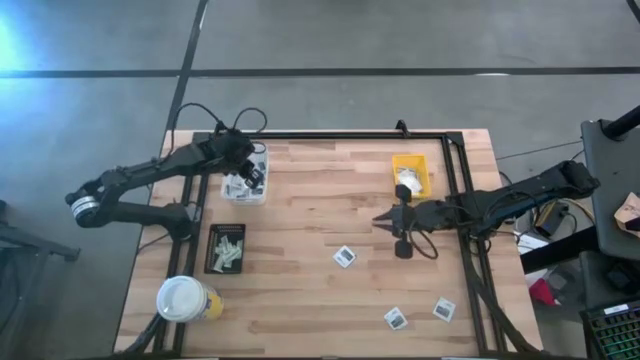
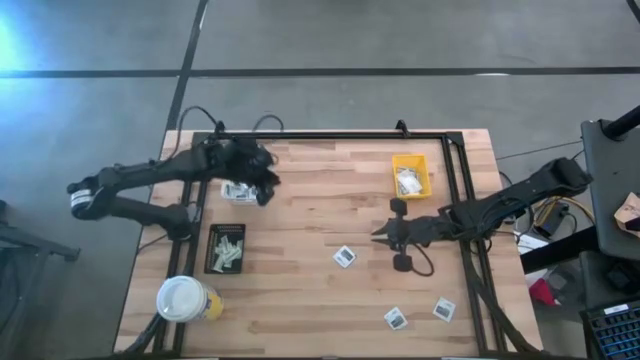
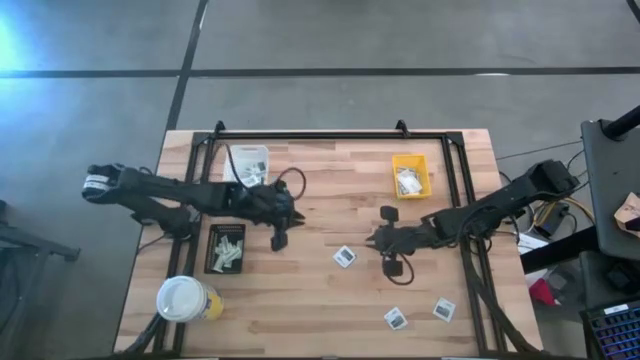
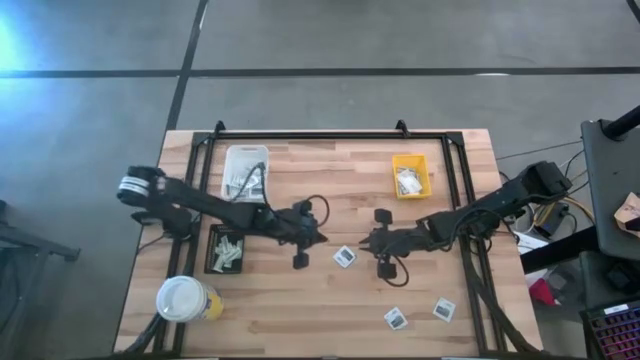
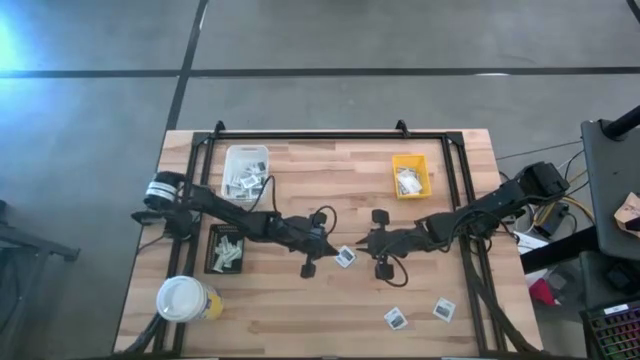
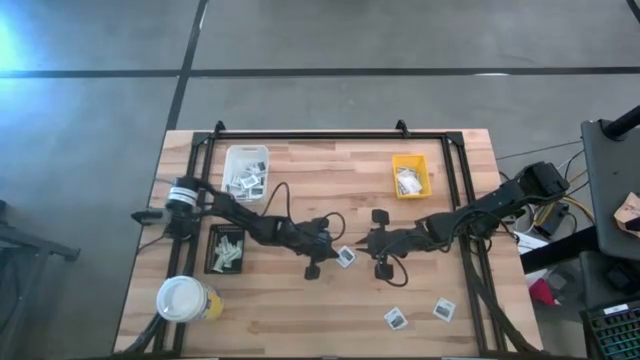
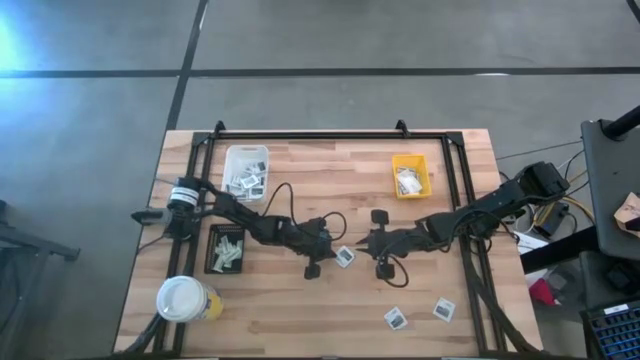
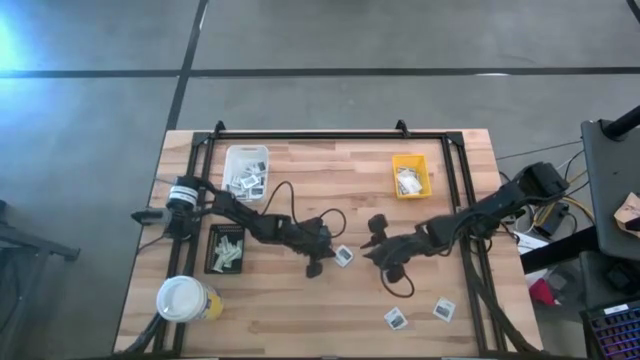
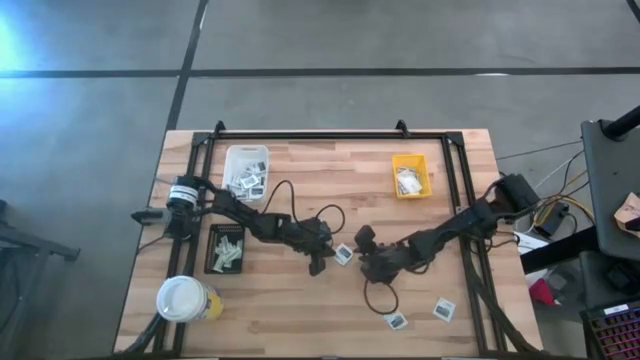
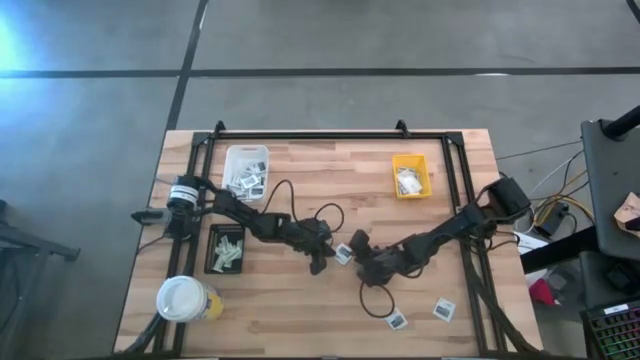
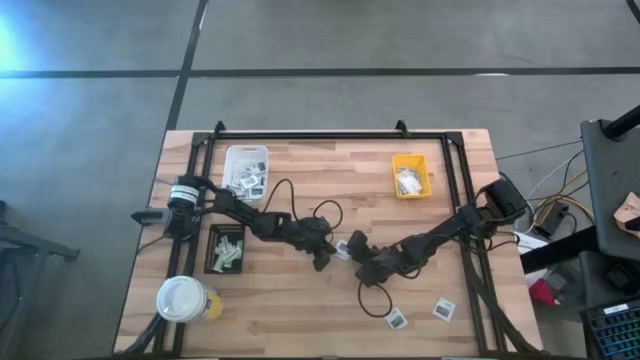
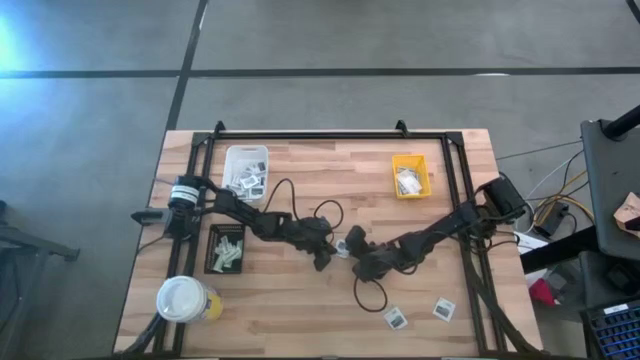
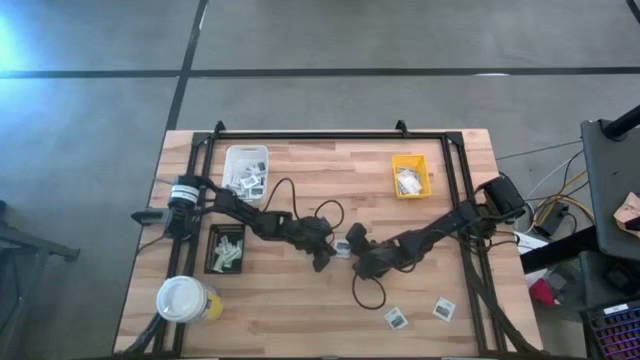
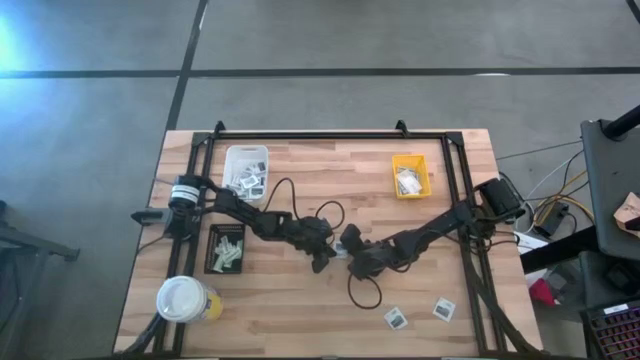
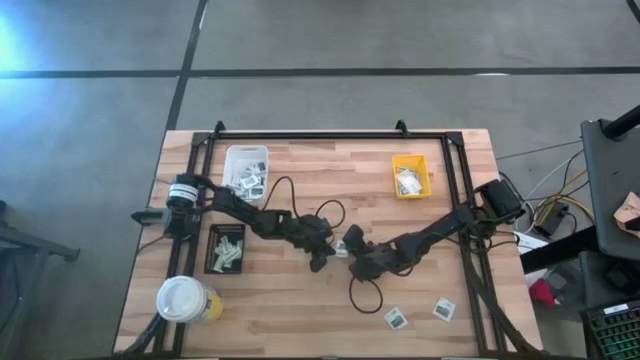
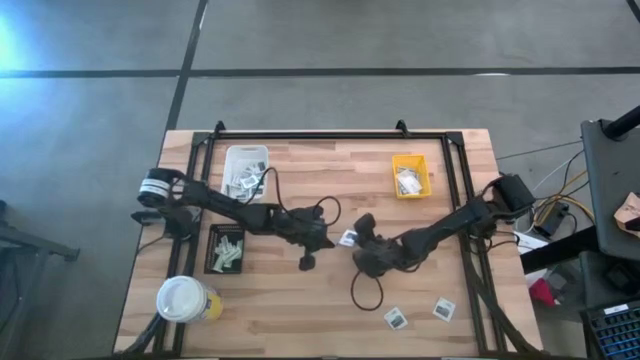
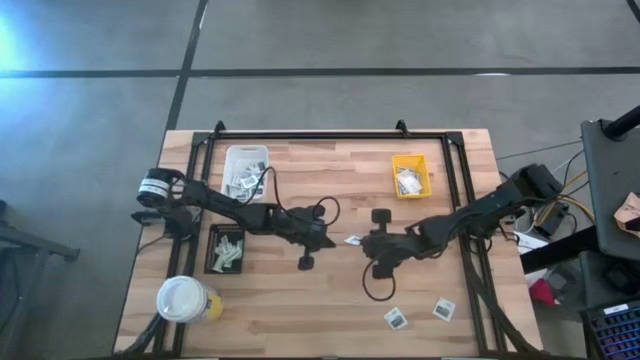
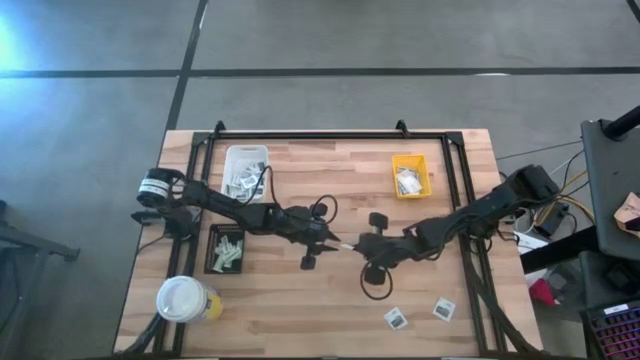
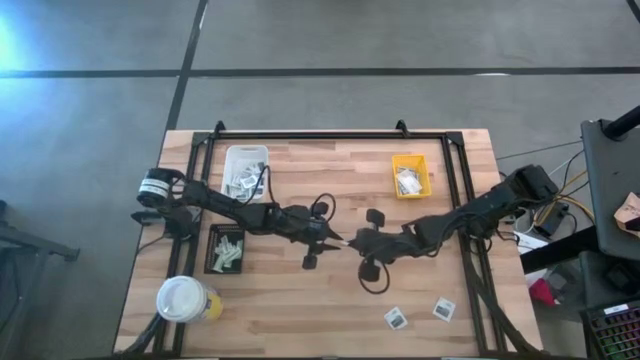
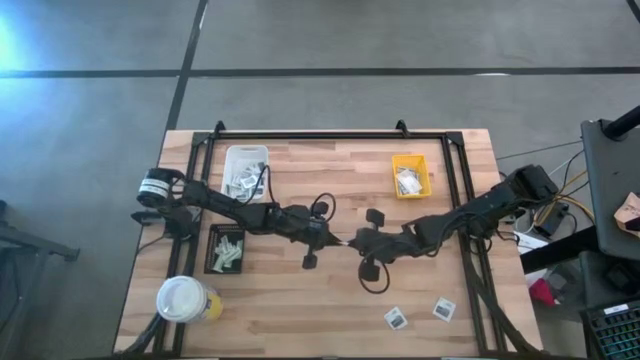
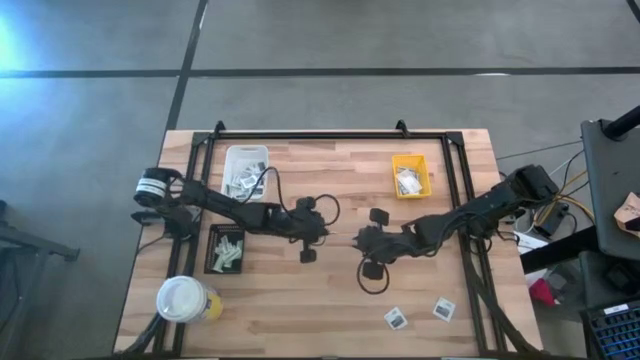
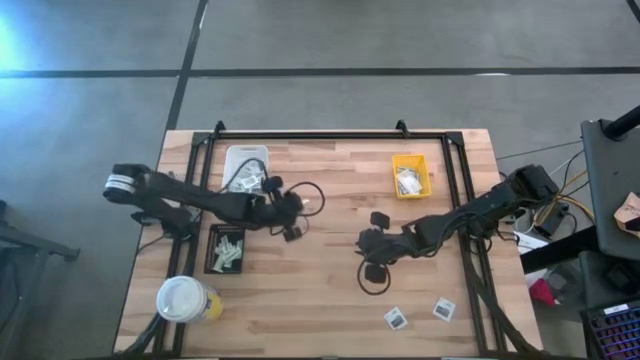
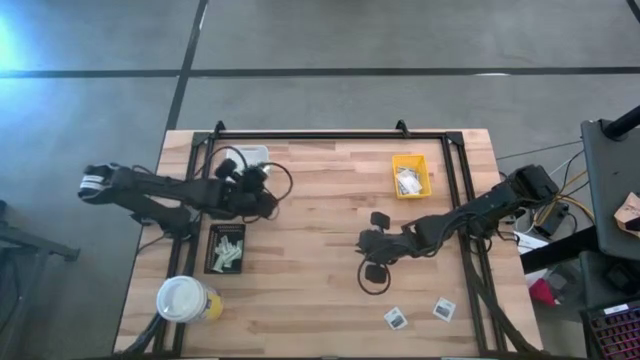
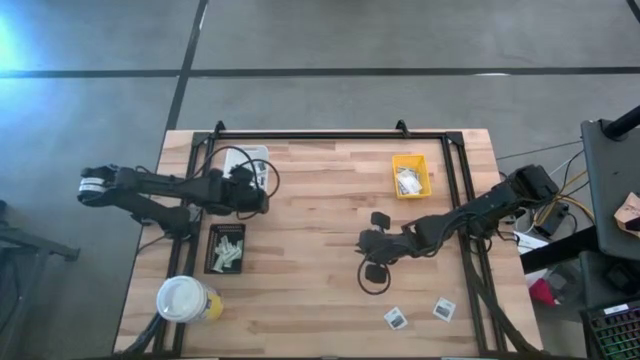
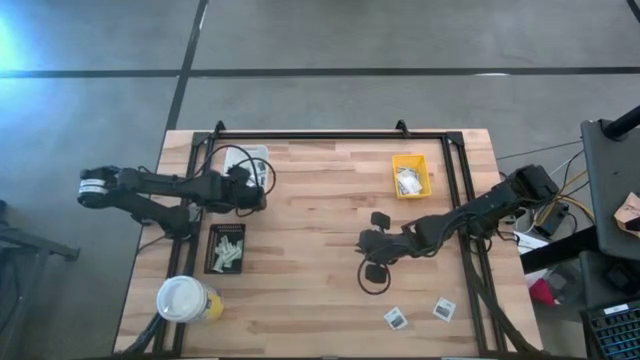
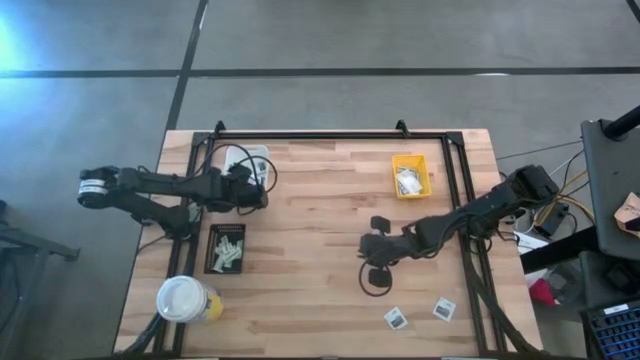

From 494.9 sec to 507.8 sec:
Task: Pick & Place First Aid Supplies
Put the gray towelette pack into the white bin

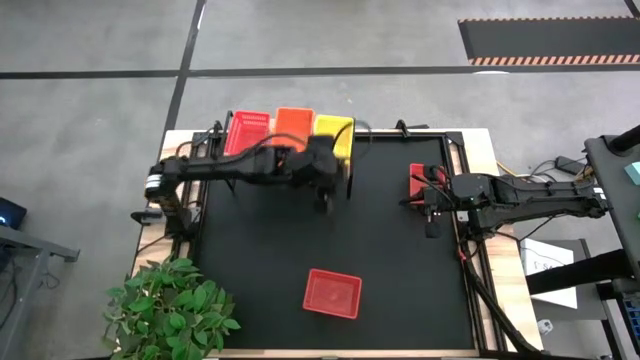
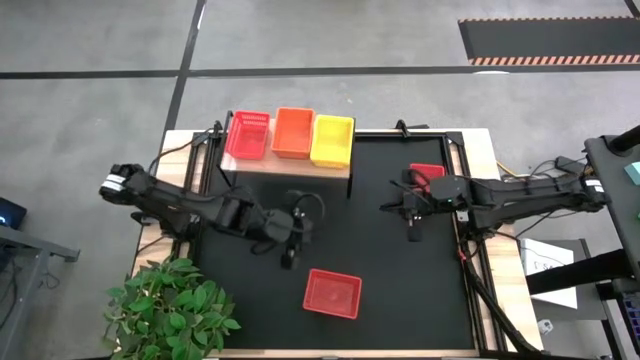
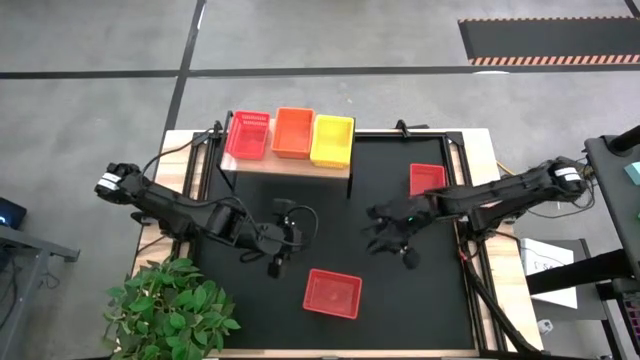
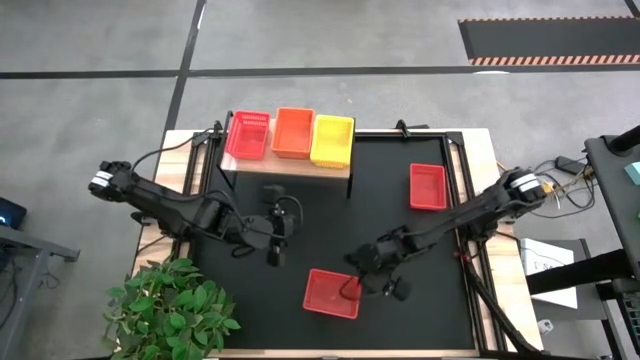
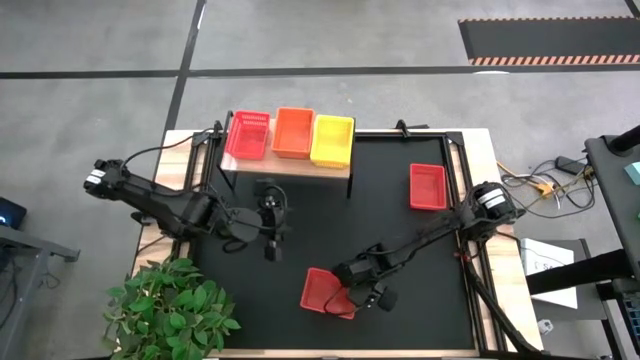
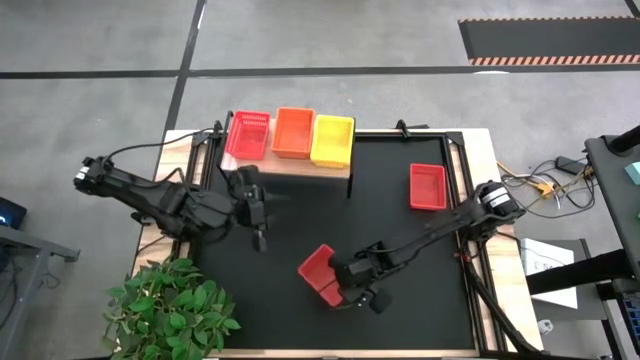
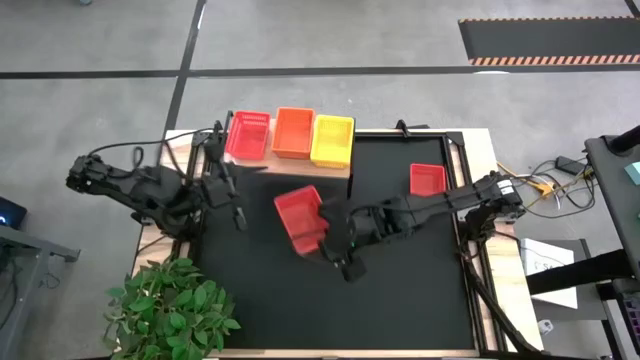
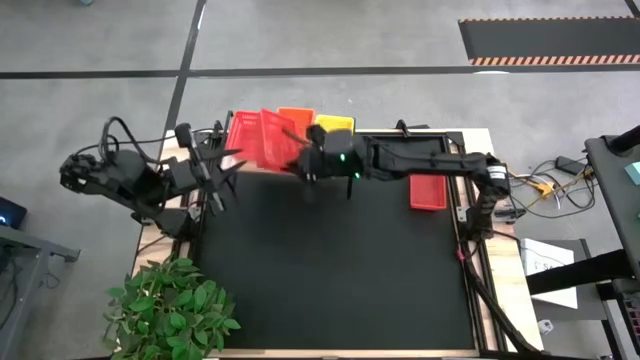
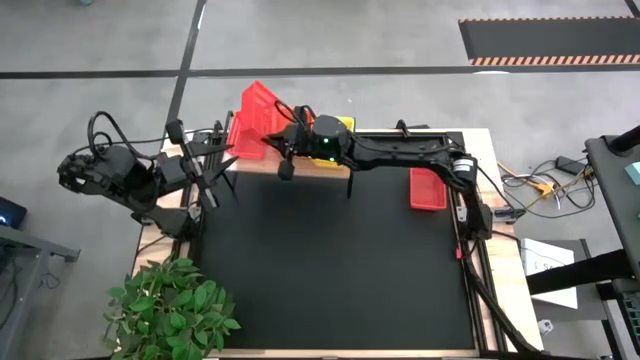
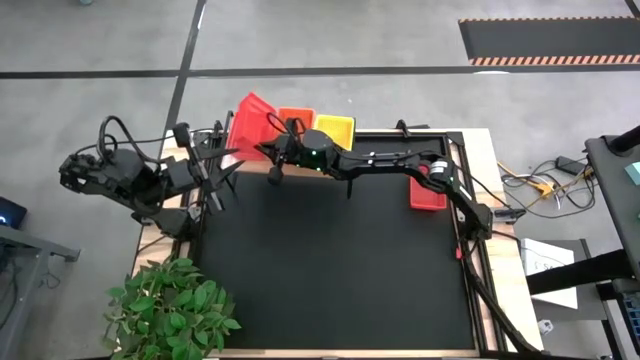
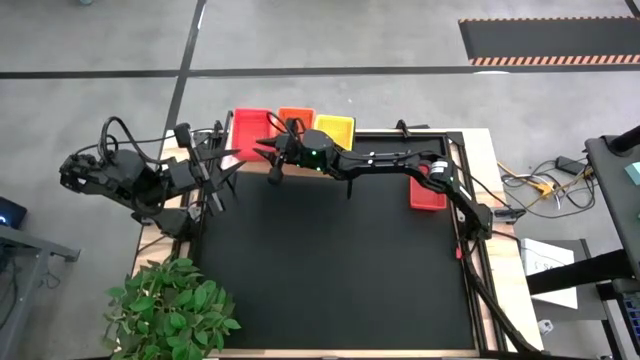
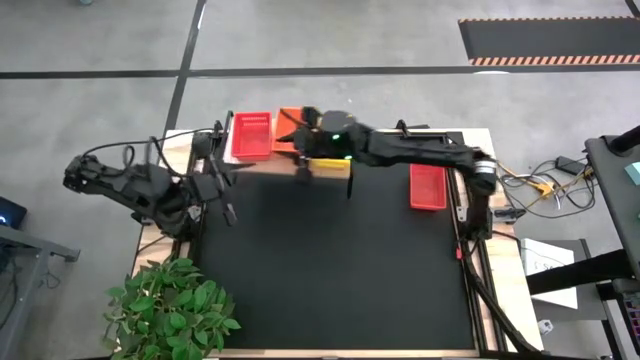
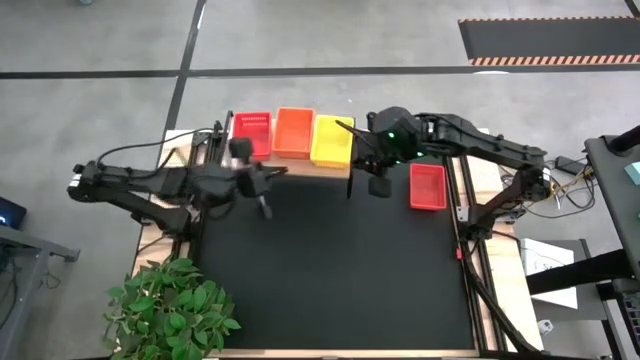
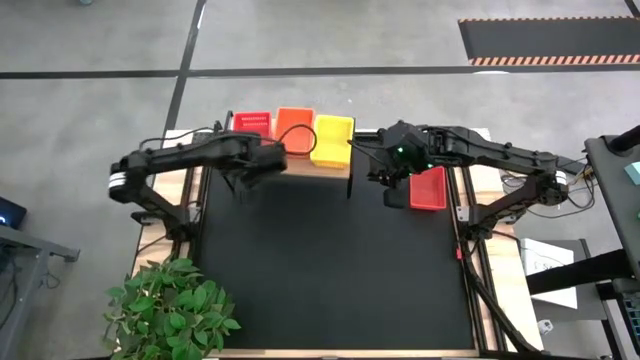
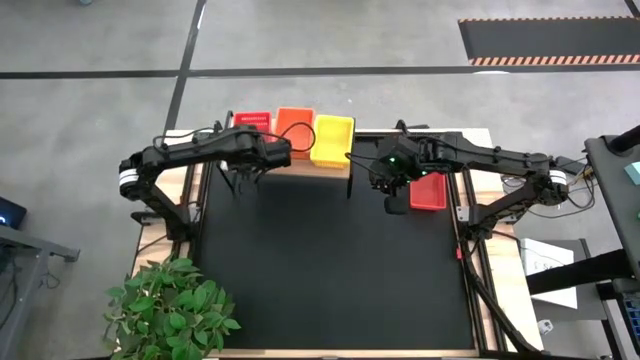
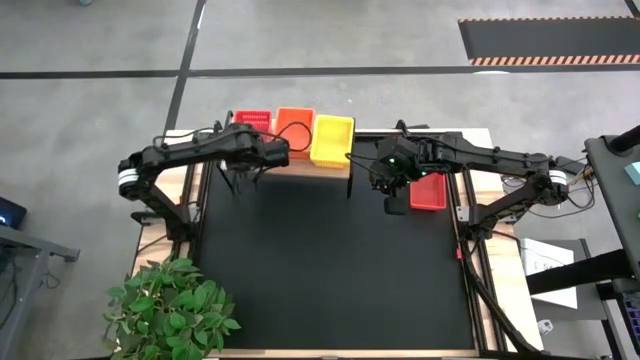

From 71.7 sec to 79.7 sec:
Task: Stack baskets on shelf by color
Stack the bottom red bin on the other red bin on the shelf

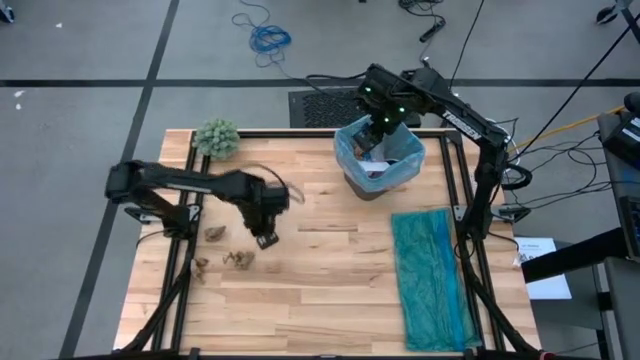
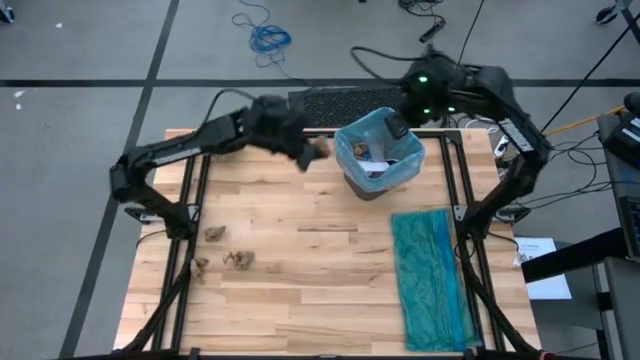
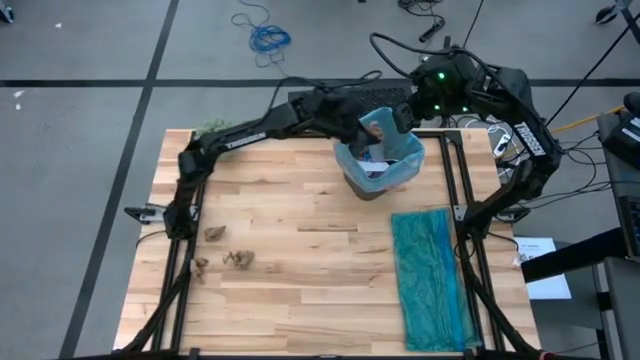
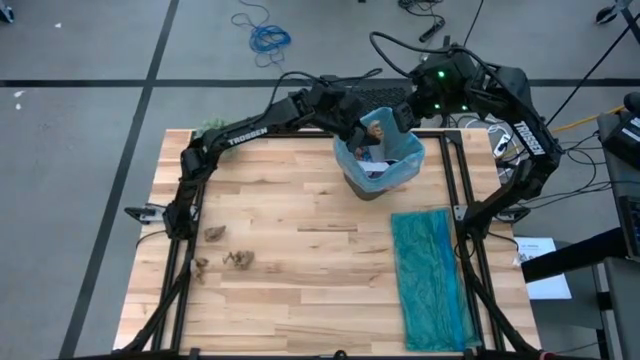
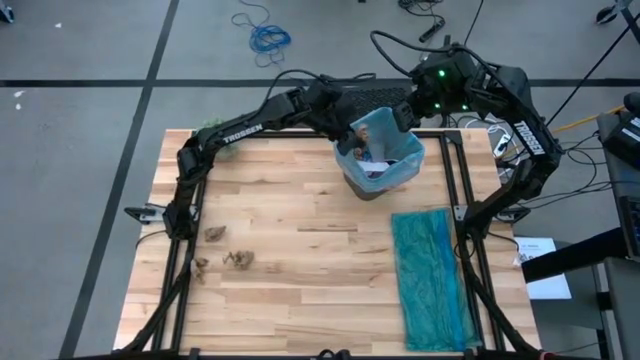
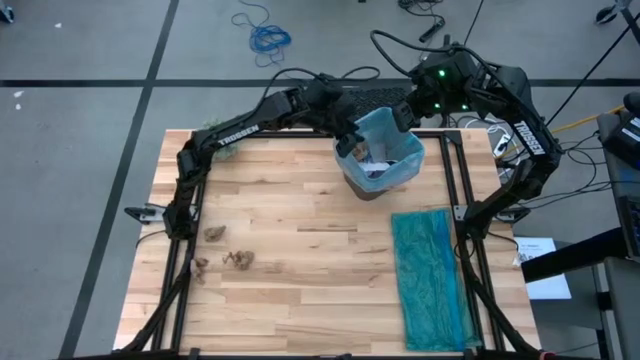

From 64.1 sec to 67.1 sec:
Task: place trash/remove bag and relplace
Put the brown paper into the trash bin
